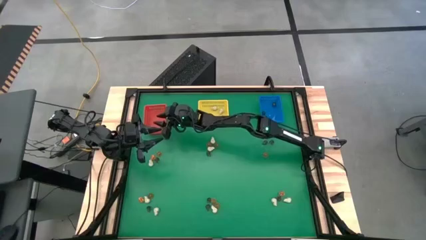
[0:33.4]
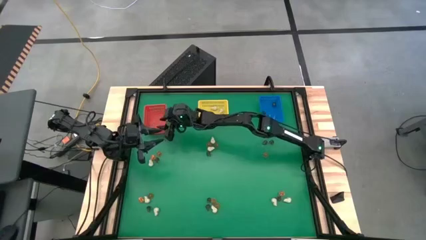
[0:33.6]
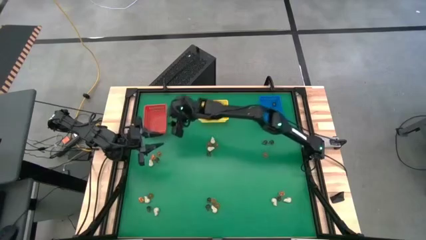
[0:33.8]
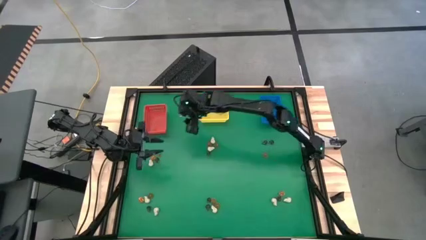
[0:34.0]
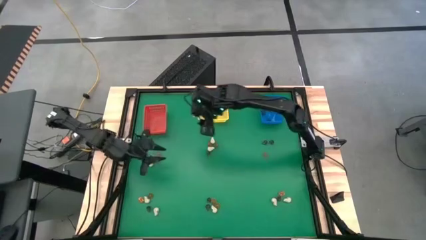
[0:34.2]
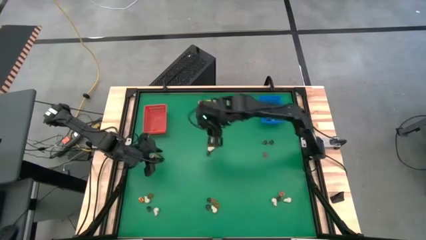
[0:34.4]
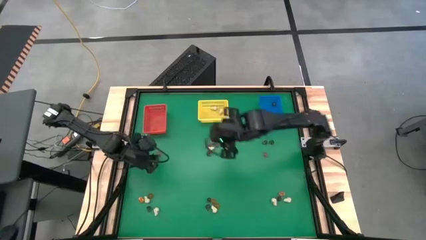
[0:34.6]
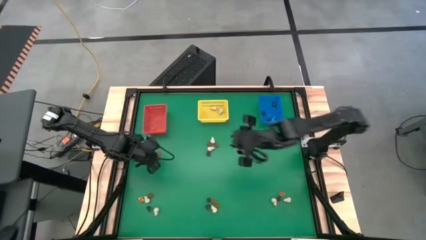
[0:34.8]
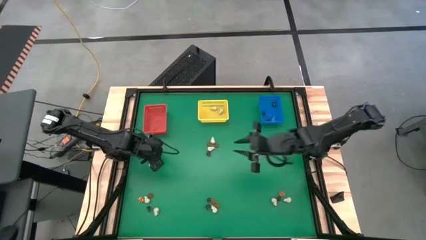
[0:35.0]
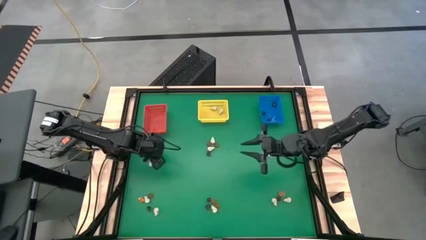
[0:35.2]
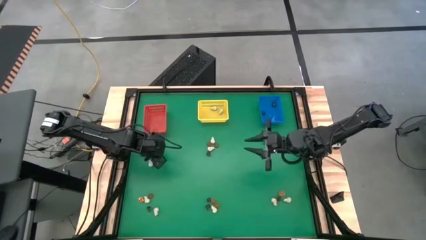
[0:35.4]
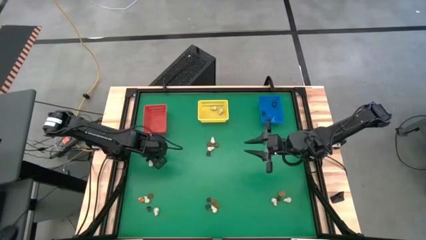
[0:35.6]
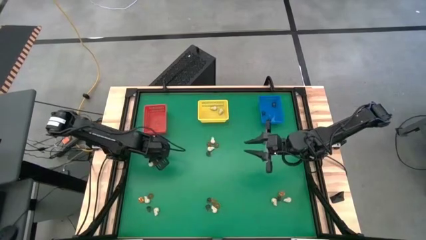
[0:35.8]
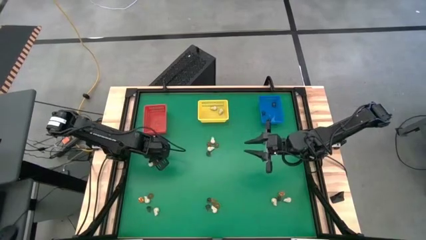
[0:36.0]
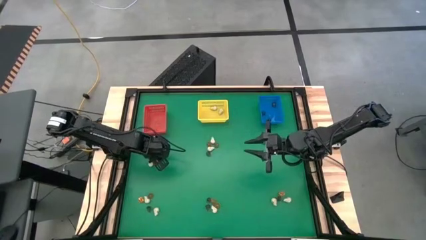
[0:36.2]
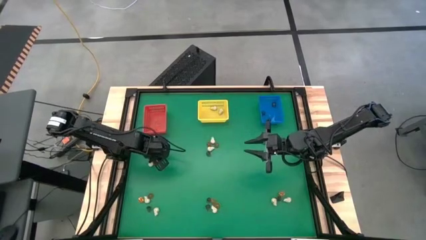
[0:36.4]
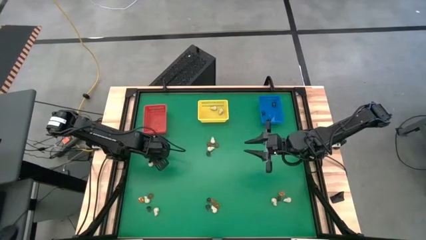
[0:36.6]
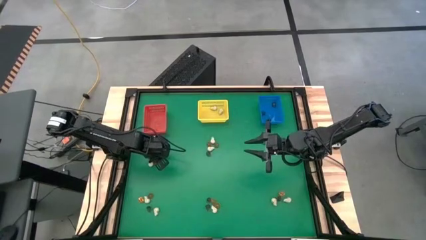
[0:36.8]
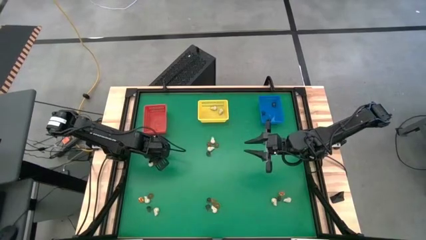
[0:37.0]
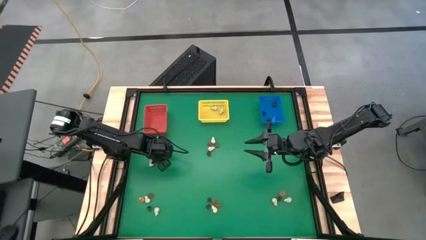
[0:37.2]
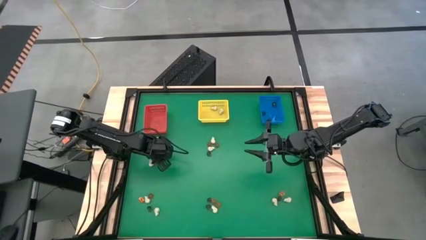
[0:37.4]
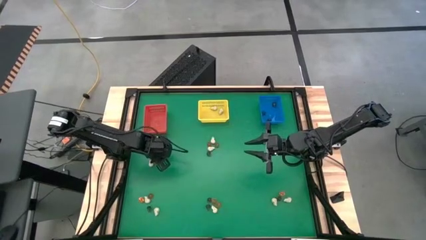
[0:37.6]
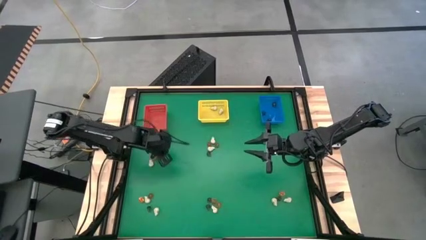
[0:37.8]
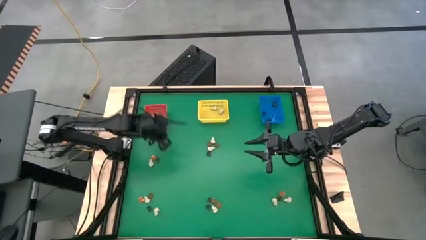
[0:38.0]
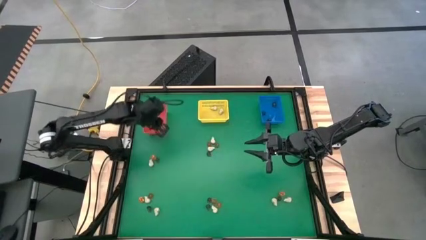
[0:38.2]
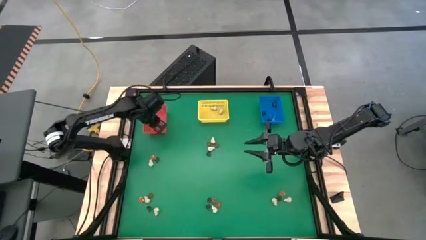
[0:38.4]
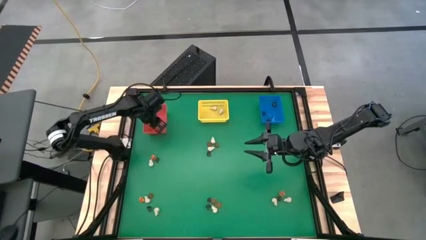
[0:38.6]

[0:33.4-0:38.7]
Task: Sort Halloween decoration
Put the orange flower toy into the red bin

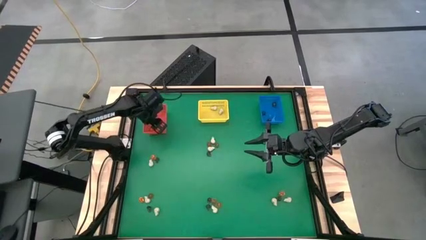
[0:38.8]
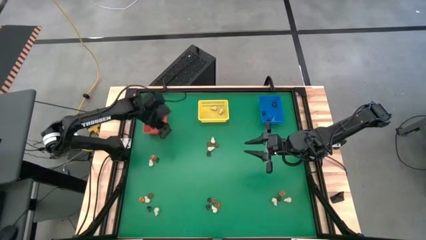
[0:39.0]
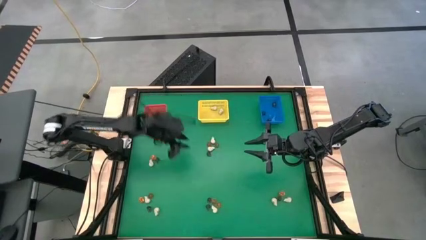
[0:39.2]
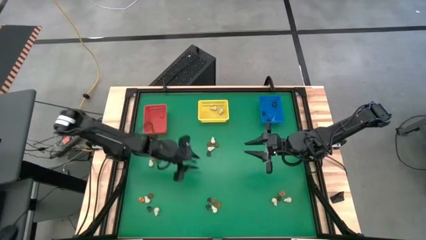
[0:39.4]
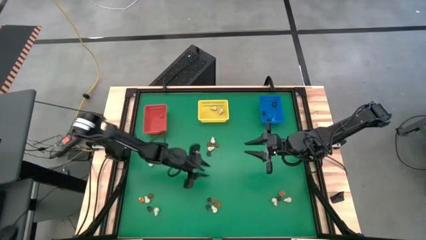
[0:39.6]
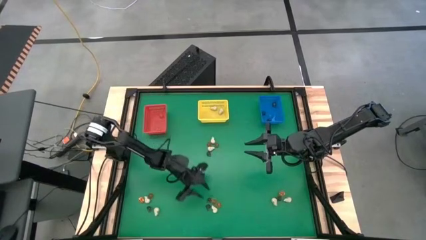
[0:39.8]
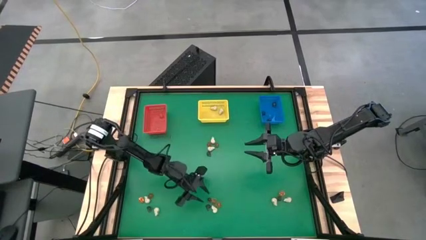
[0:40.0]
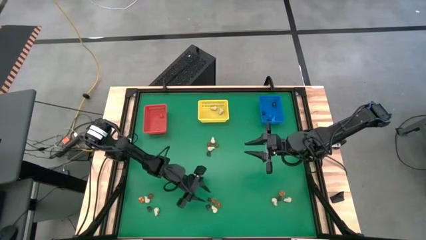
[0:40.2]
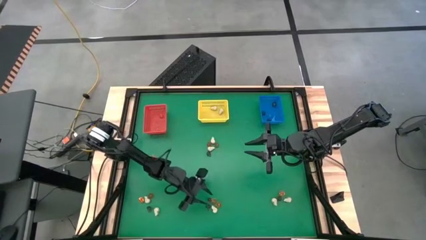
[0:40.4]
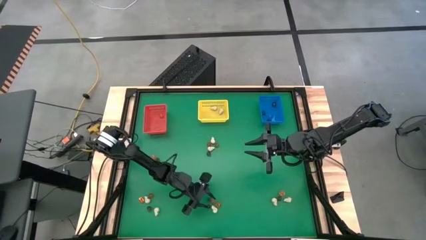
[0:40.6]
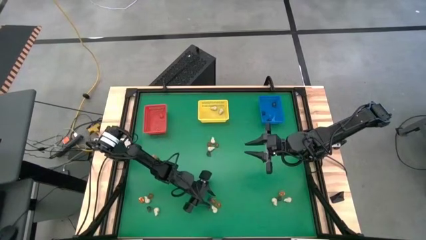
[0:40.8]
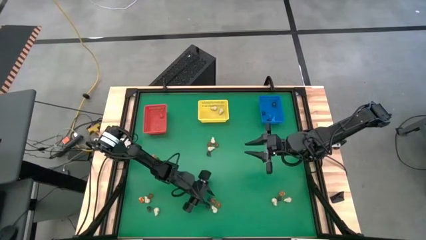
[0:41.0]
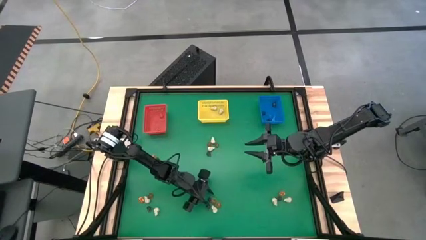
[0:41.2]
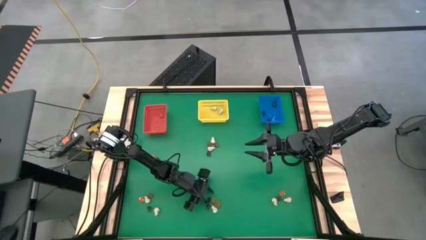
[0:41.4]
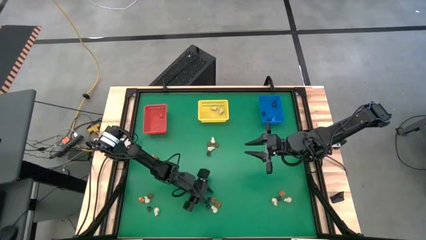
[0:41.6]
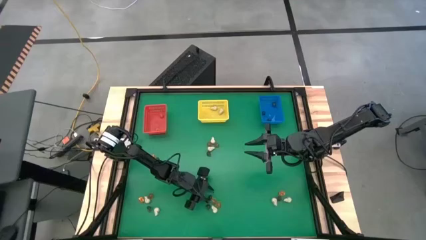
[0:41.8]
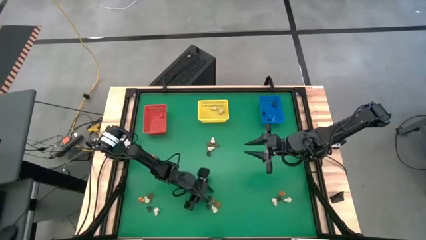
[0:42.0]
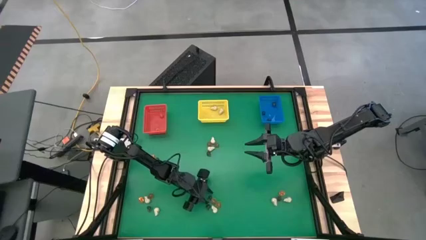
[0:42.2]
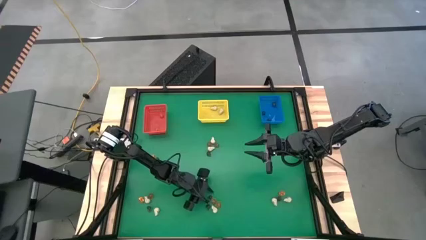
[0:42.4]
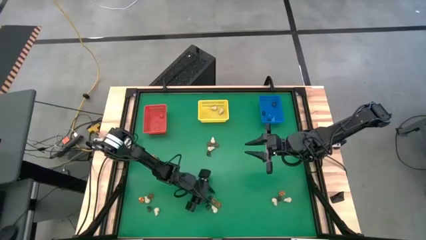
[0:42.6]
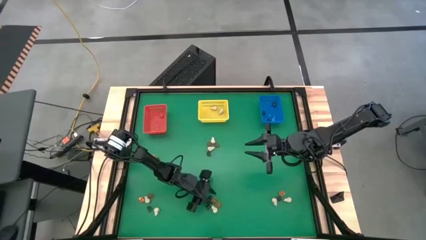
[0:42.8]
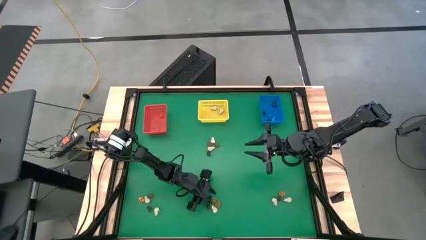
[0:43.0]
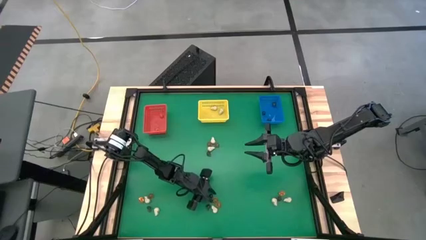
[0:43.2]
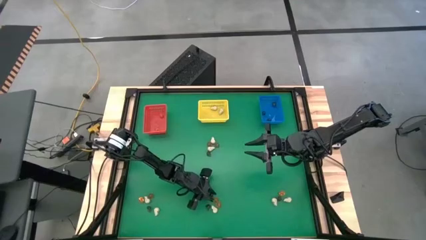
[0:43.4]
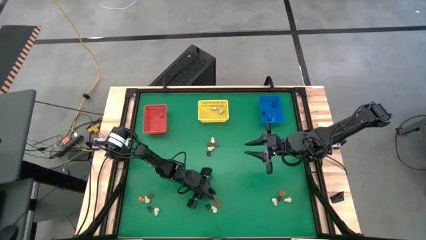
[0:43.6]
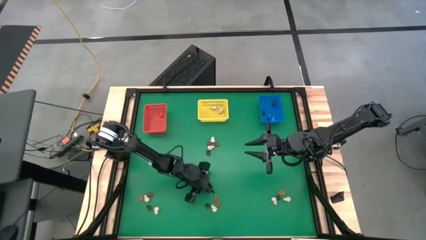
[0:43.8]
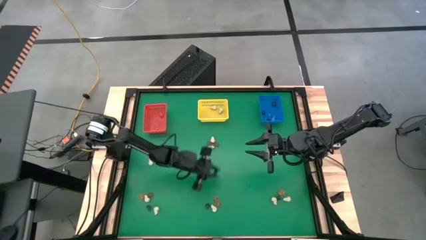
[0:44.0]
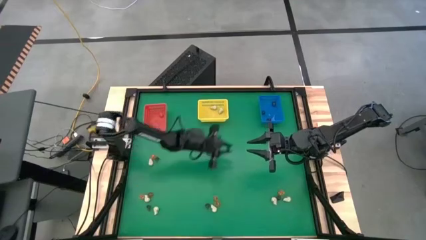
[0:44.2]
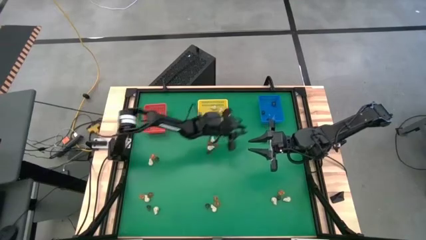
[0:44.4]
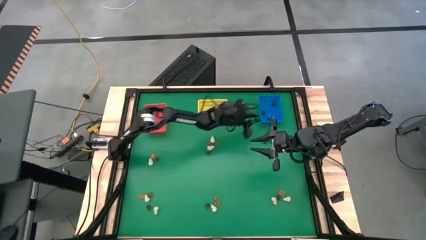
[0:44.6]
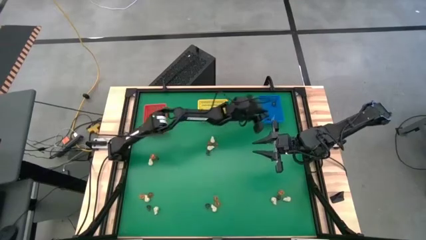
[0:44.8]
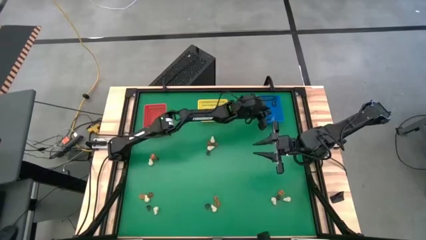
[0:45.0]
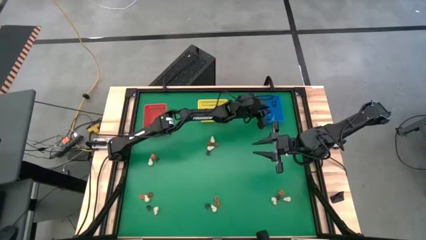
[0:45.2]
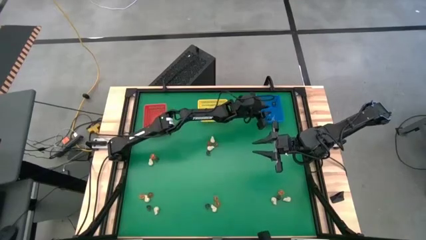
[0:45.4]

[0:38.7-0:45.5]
Put the purple skull toy into the blue bin

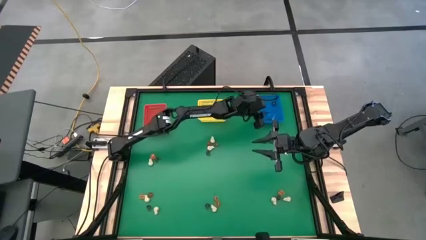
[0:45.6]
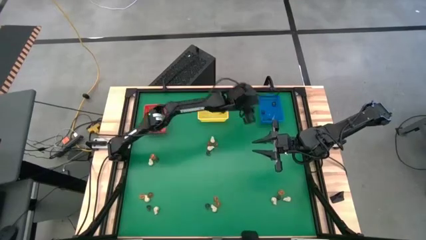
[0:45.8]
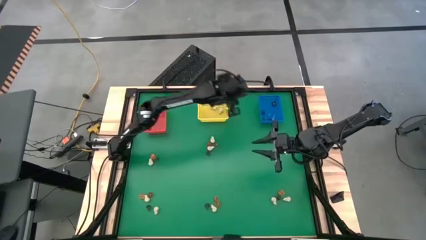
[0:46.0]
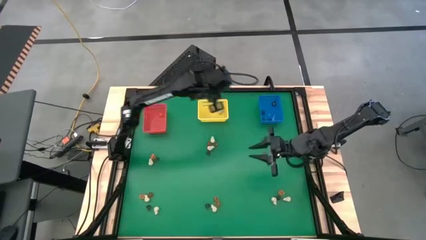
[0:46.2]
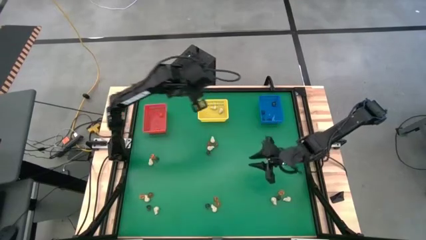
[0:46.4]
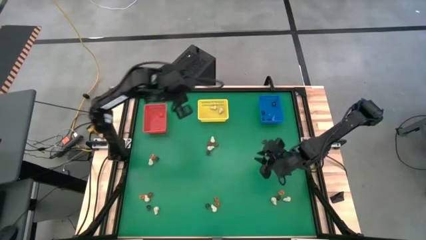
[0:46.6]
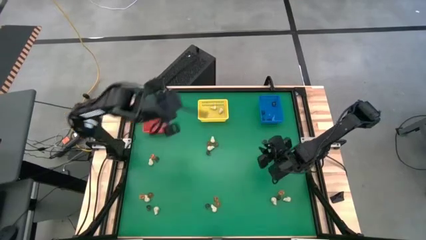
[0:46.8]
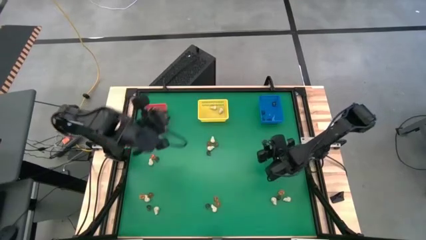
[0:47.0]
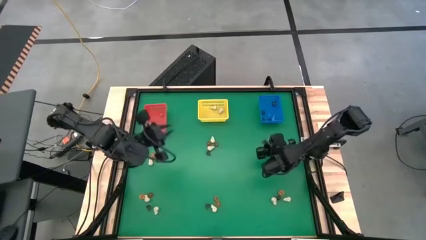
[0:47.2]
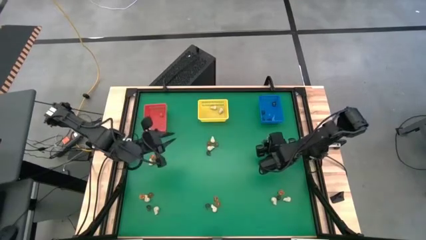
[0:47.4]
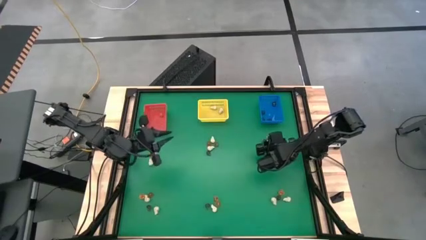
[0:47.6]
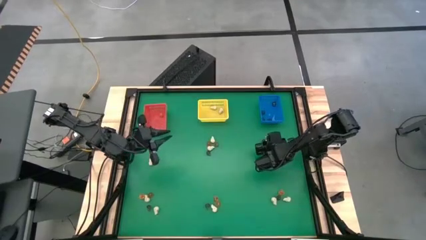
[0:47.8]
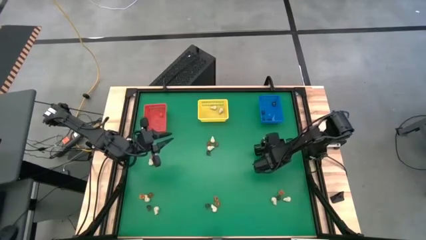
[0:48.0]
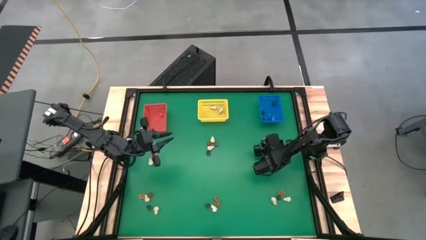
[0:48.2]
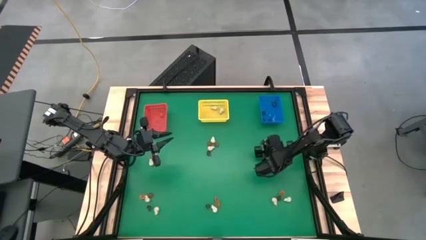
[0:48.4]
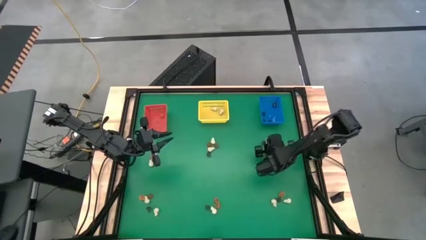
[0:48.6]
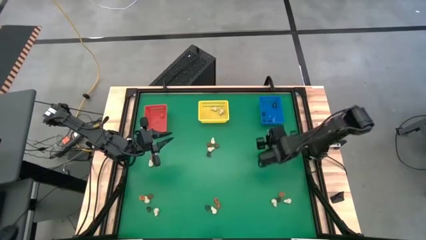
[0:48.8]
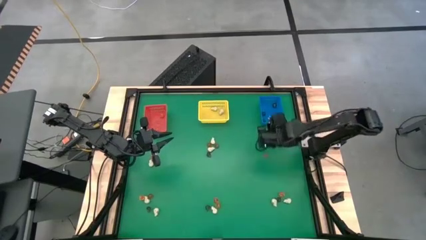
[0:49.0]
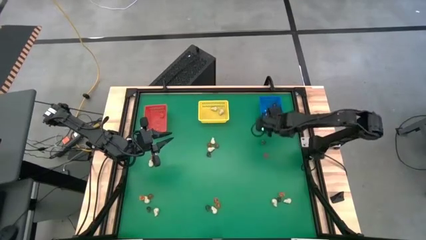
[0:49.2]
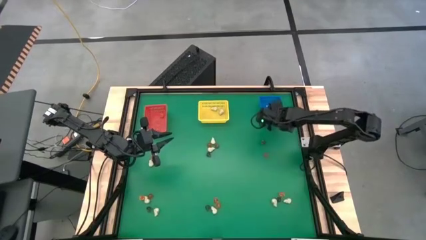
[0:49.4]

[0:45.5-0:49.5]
Put the purple skull toy into the blue bin

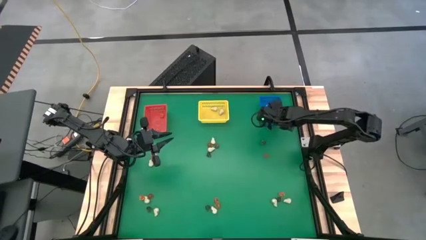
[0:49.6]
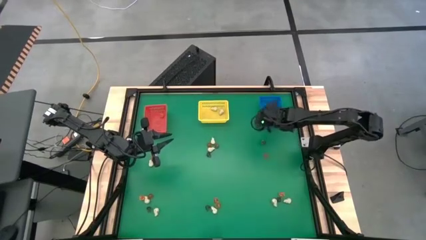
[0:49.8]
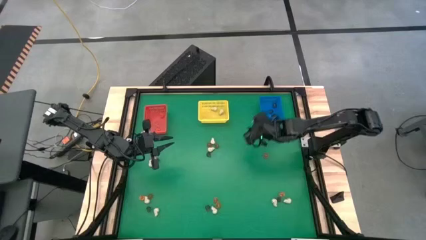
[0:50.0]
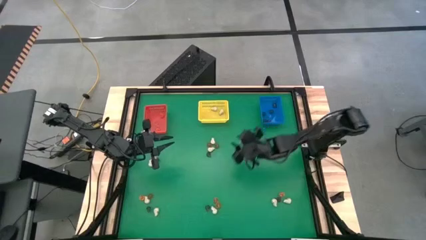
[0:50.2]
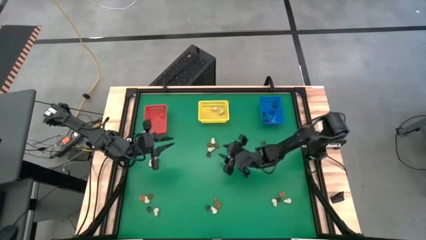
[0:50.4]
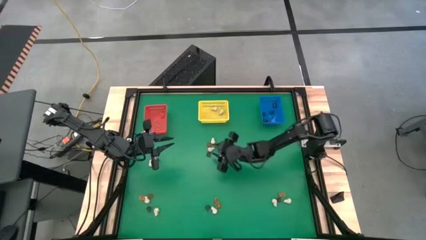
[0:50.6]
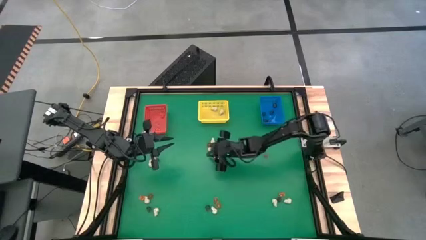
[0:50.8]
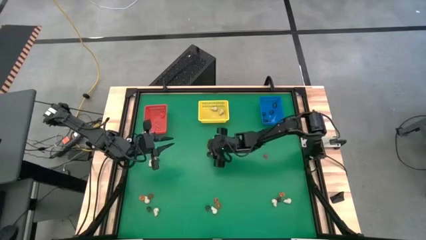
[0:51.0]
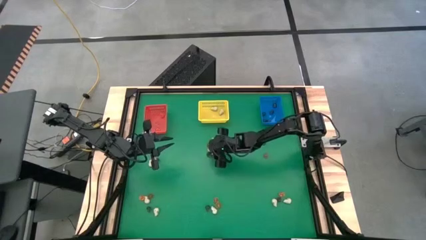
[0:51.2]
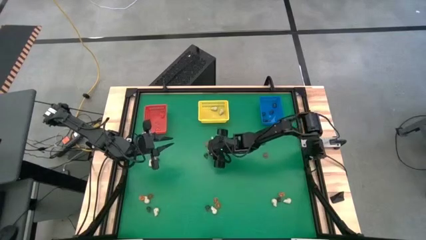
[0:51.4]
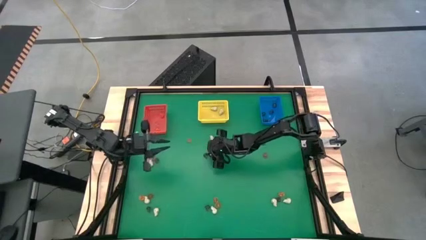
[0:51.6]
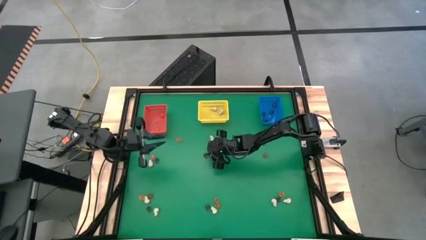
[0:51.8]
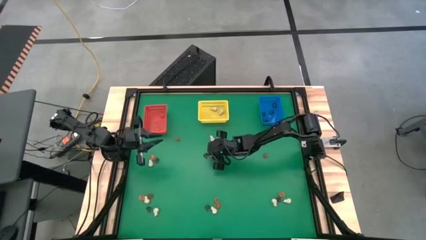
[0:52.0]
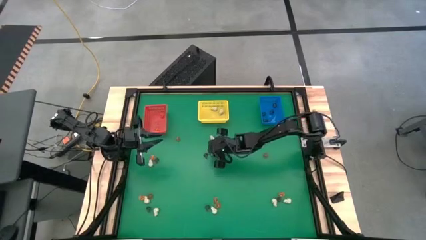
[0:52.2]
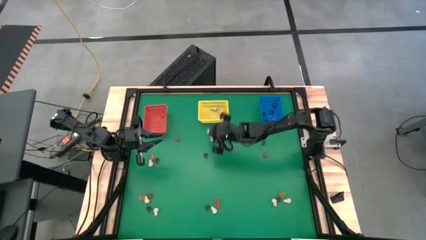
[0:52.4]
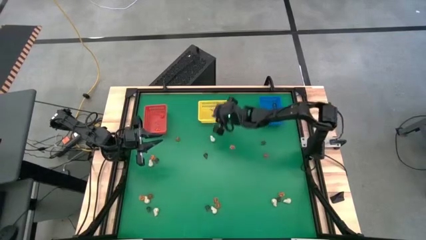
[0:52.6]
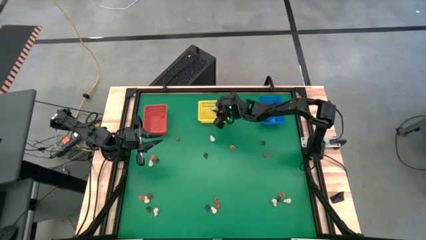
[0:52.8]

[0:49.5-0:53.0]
Put the white skull toy into the yellow bin
